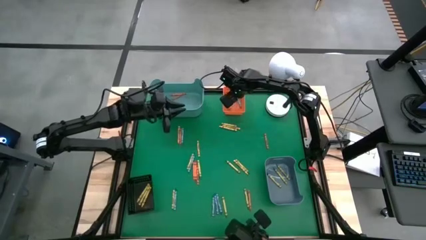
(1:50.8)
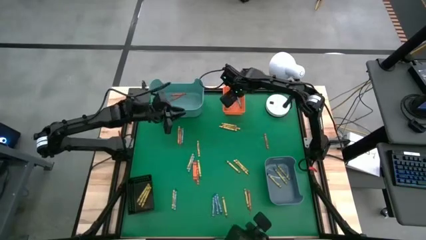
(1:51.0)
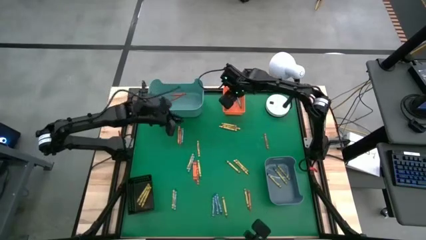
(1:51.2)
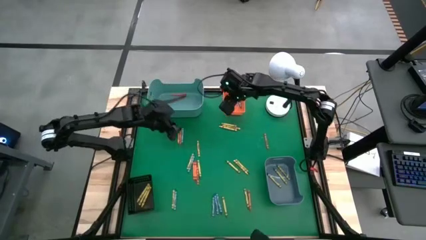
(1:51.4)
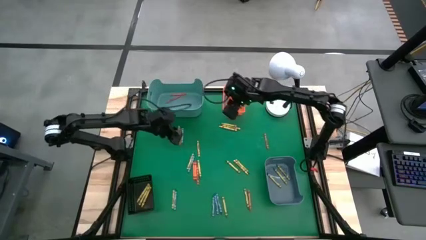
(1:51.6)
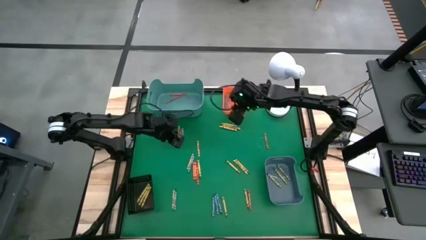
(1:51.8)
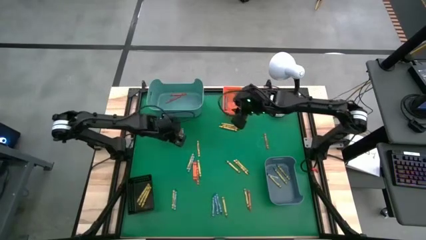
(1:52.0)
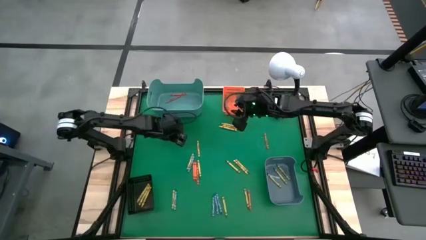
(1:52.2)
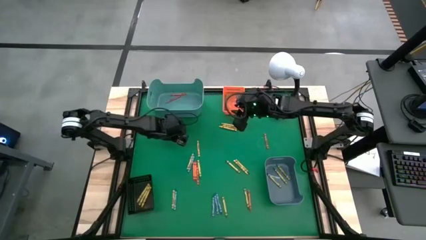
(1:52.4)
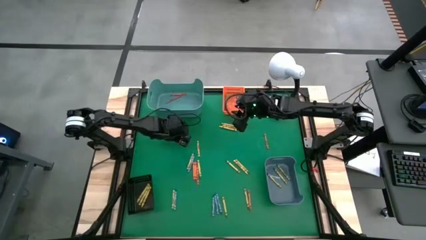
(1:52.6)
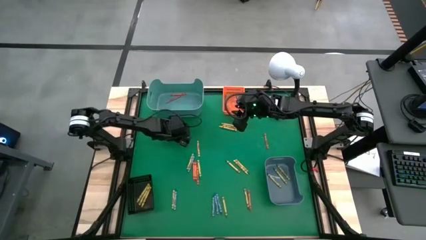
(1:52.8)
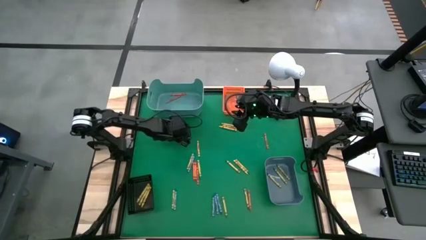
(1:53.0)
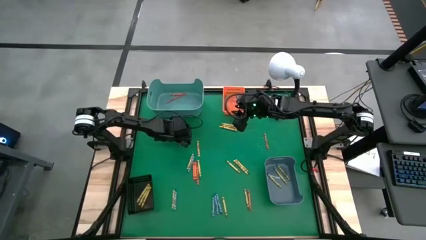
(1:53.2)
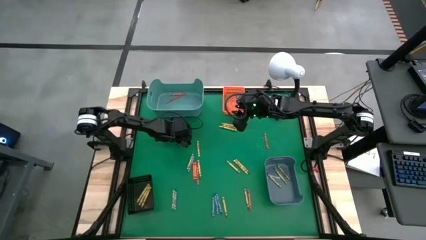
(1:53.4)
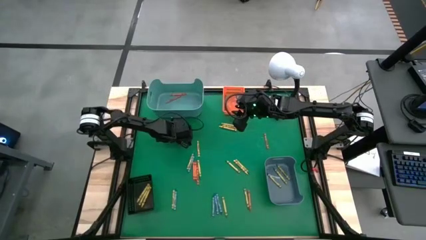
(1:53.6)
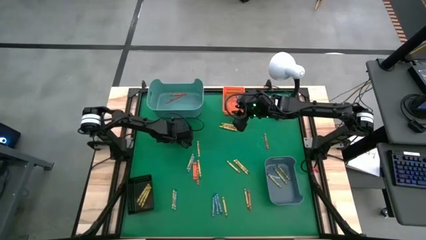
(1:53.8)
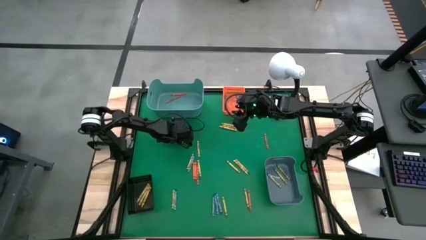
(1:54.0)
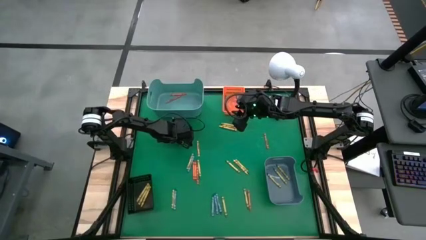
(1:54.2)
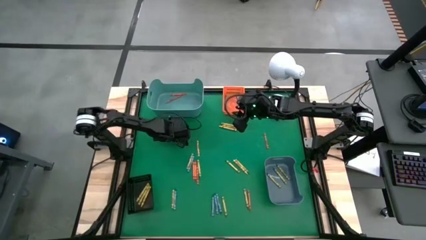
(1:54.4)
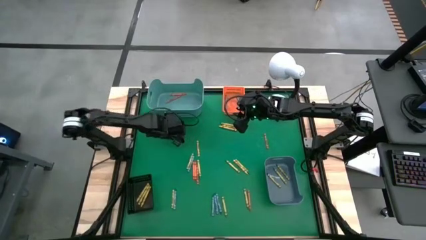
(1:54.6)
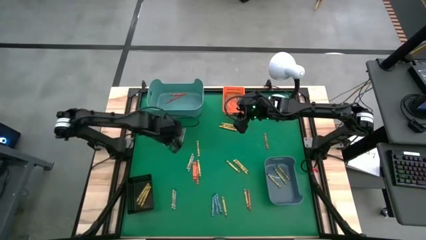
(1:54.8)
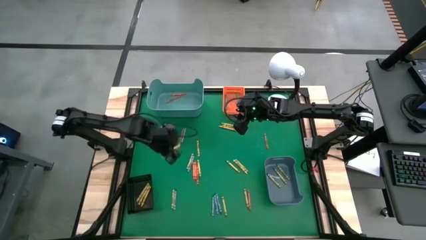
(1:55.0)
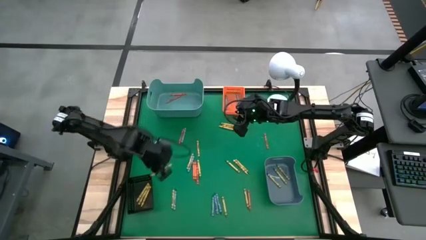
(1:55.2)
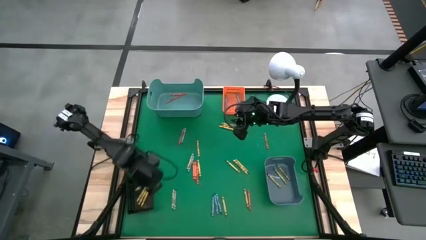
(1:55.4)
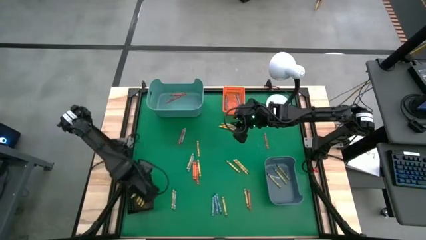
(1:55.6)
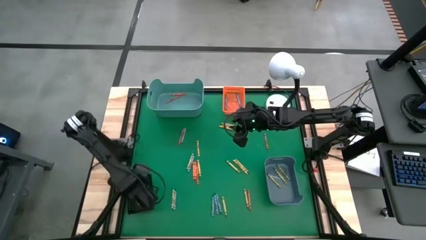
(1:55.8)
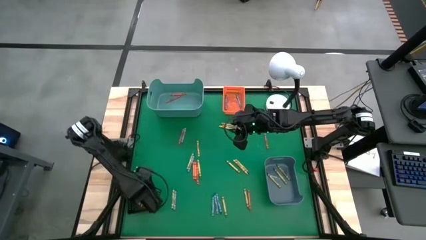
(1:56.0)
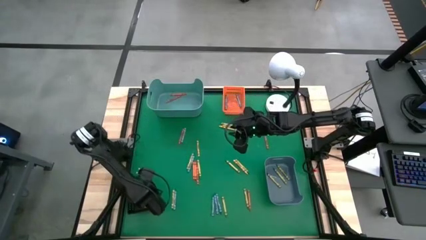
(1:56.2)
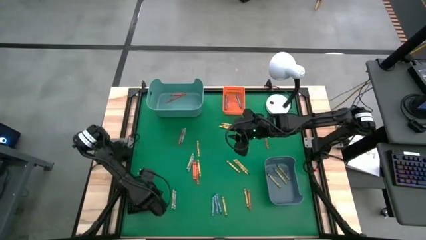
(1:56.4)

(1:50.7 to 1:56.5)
Task: Sort crayons
Put the yellow crayon into the black bin

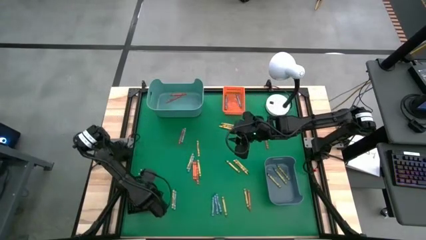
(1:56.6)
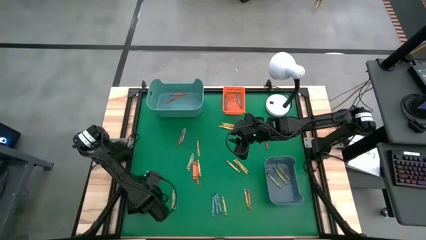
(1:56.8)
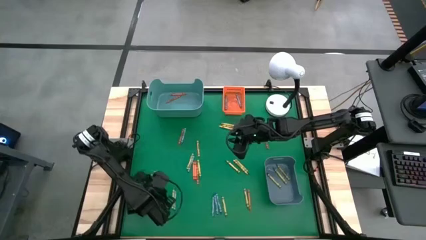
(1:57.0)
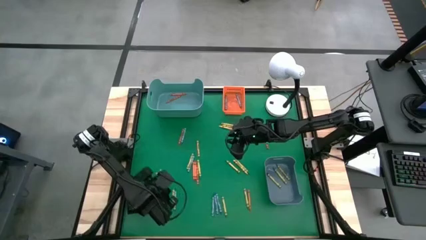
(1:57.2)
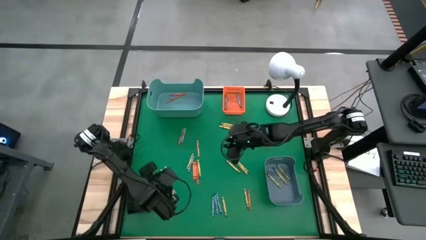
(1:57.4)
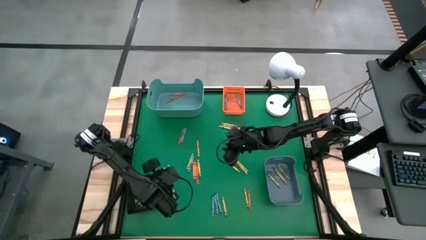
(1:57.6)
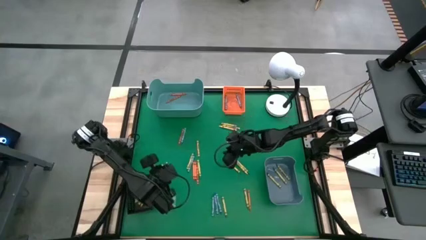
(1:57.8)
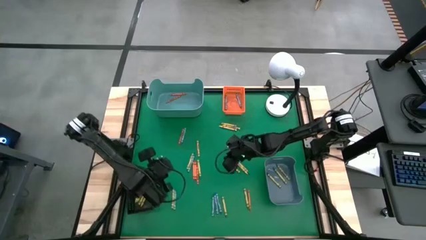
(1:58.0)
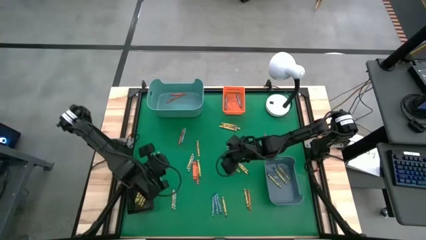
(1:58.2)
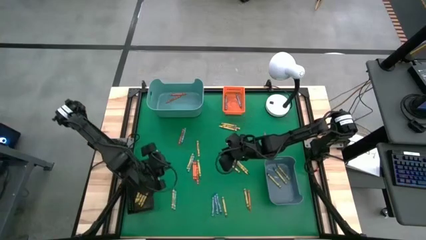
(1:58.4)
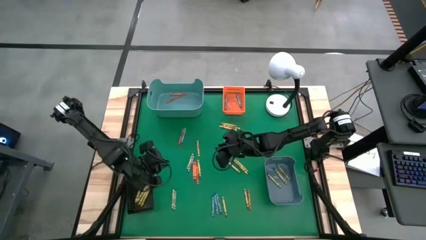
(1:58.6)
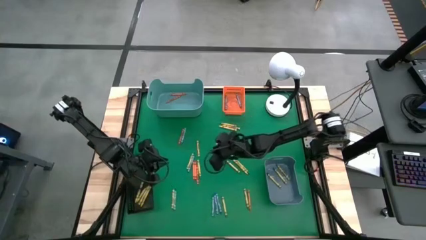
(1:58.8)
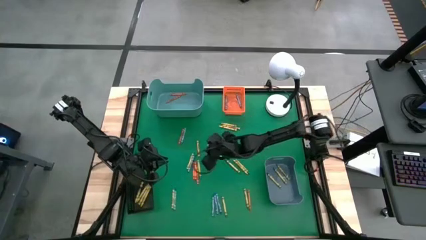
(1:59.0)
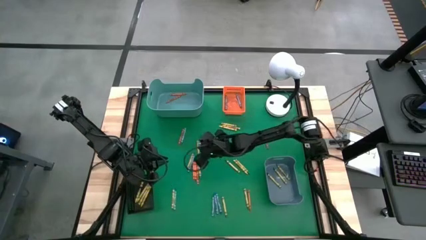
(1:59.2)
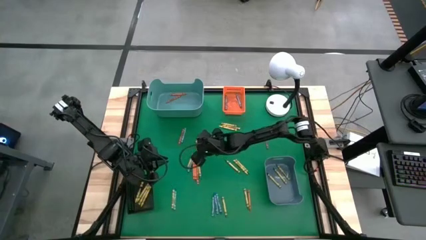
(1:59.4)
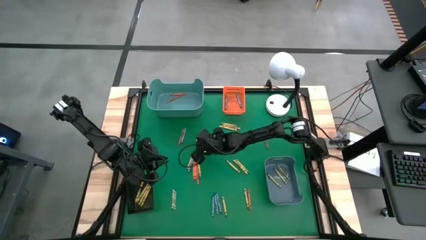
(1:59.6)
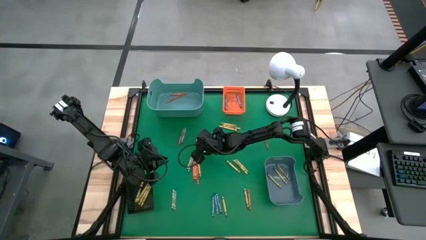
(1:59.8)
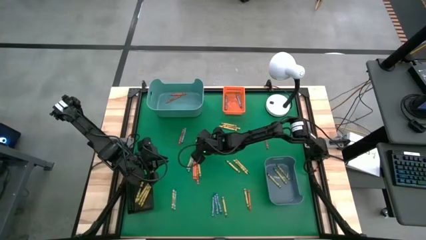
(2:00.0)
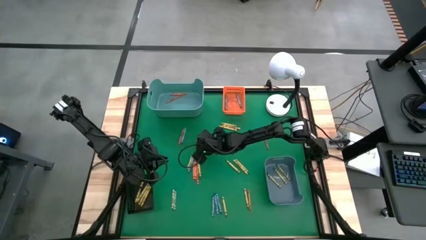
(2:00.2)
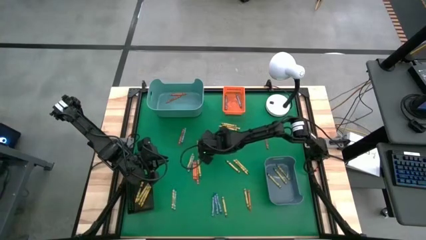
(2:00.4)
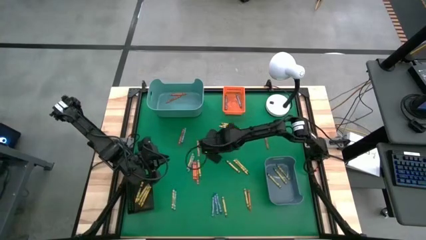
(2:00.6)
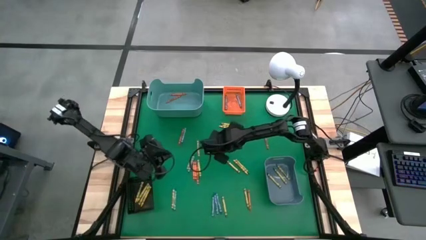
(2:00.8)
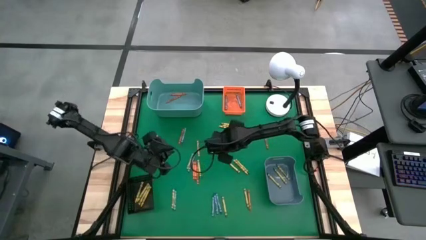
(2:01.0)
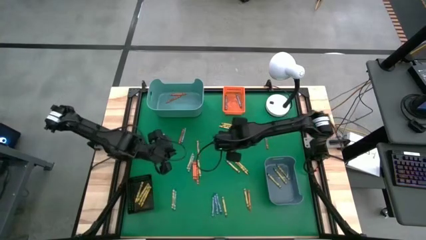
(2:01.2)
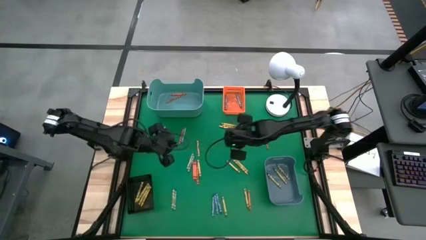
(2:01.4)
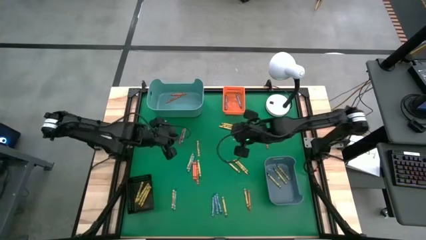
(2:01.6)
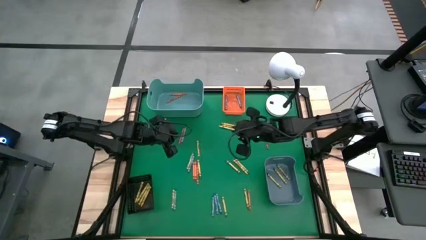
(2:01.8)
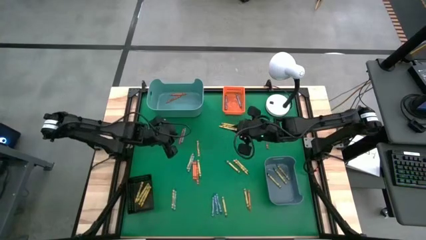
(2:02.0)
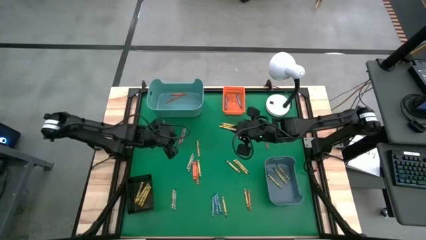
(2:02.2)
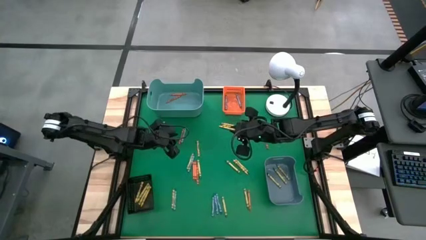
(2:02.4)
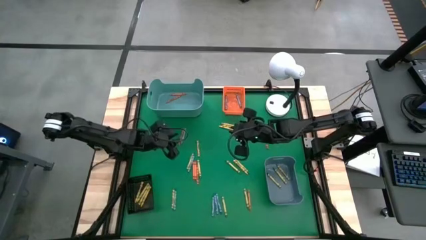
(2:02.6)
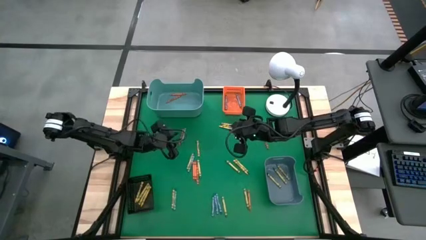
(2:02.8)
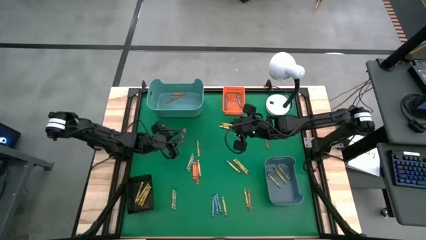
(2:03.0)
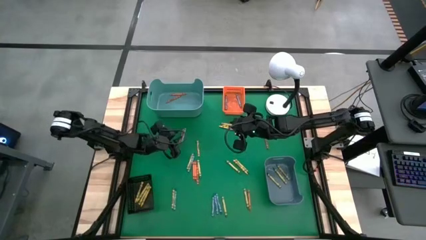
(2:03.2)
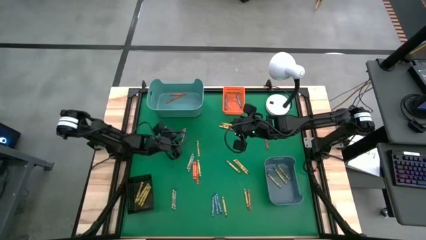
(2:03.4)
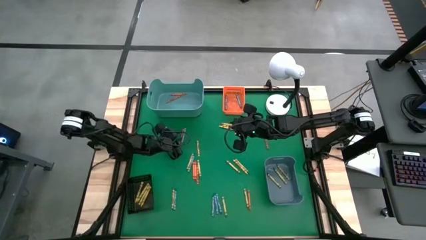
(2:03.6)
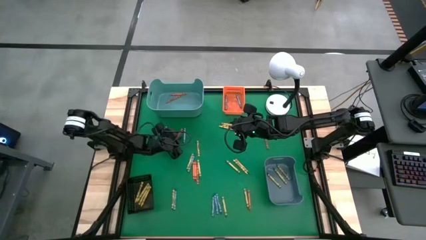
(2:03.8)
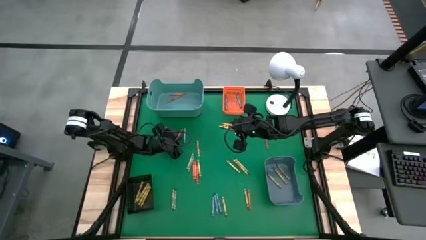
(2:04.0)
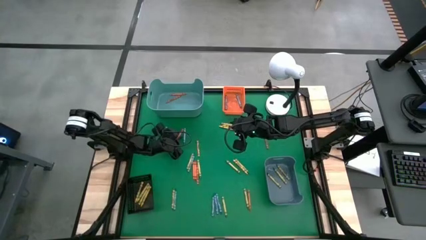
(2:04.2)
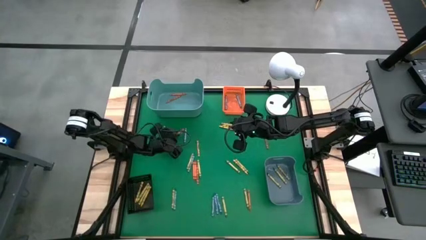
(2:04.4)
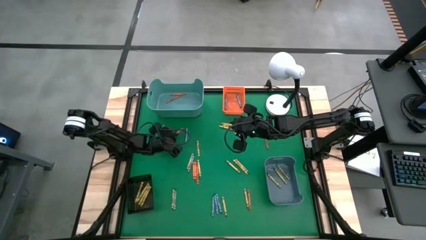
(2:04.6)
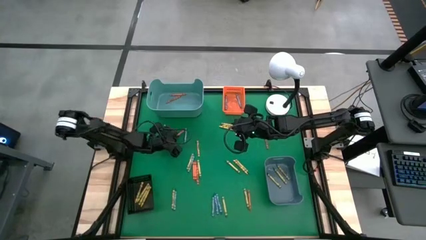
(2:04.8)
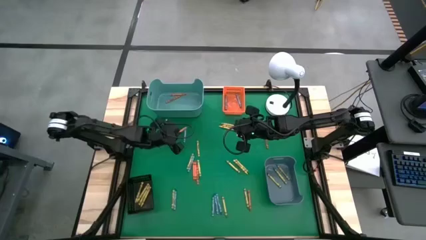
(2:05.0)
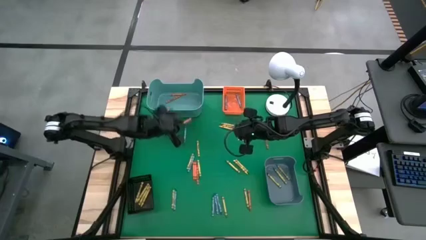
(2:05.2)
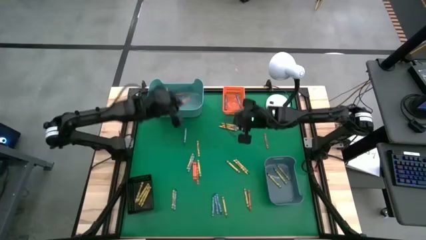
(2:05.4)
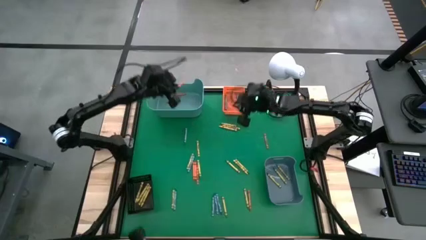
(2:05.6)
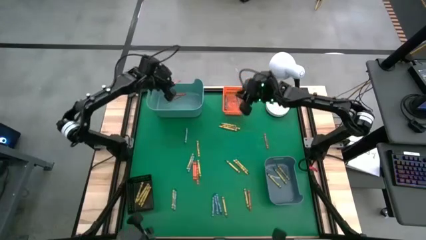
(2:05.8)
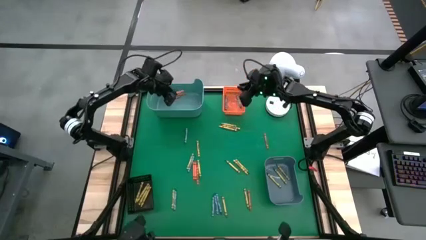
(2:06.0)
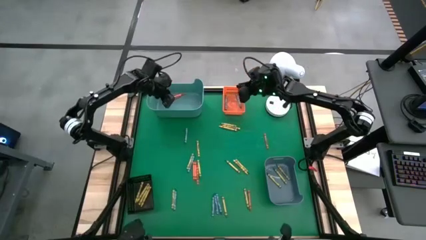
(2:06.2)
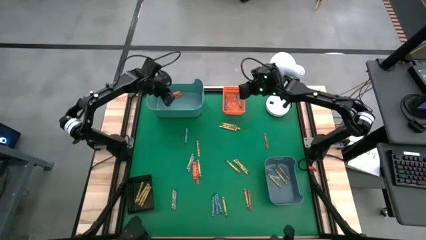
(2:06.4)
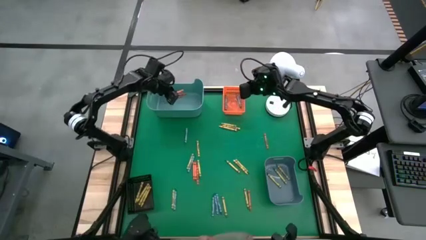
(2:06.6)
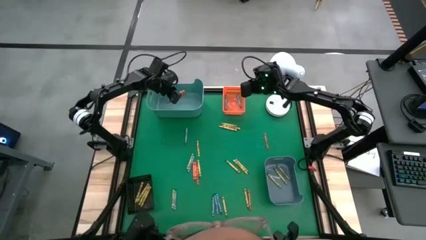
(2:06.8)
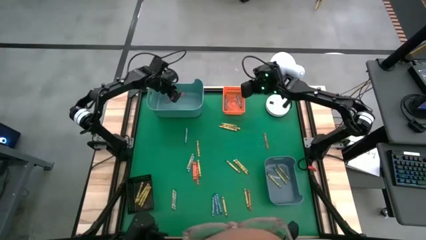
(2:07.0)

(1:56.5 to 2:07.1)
Put the orange crayon into the green bin

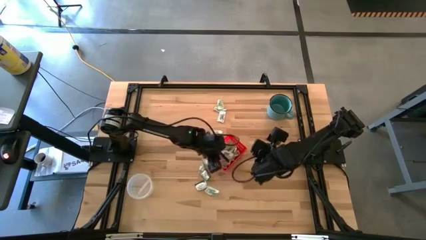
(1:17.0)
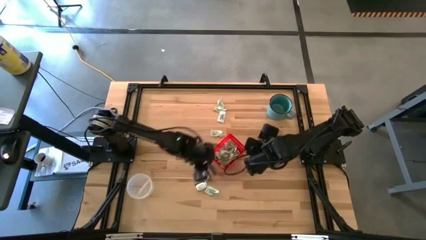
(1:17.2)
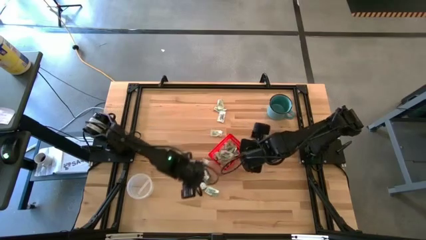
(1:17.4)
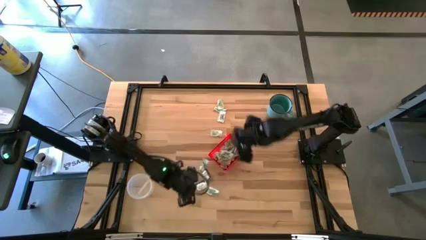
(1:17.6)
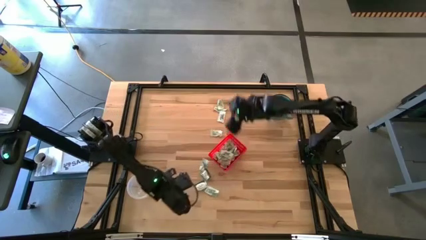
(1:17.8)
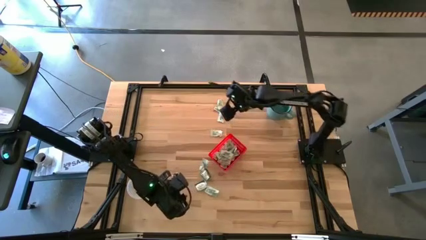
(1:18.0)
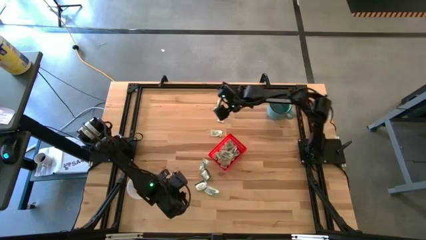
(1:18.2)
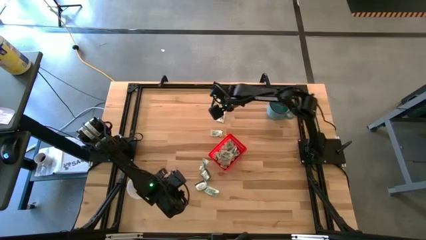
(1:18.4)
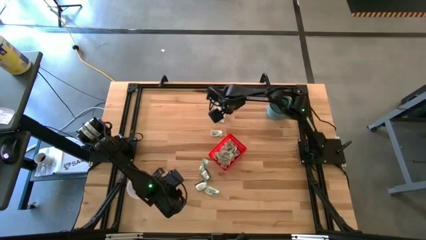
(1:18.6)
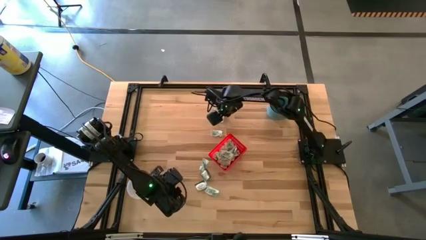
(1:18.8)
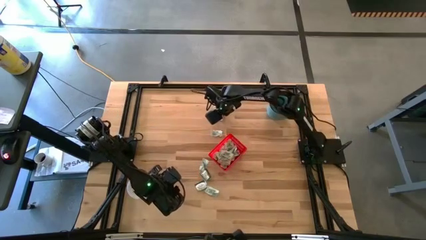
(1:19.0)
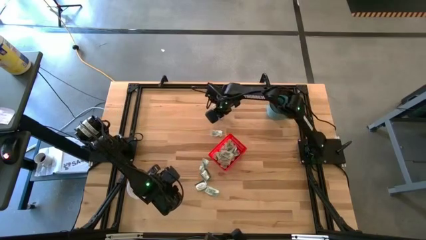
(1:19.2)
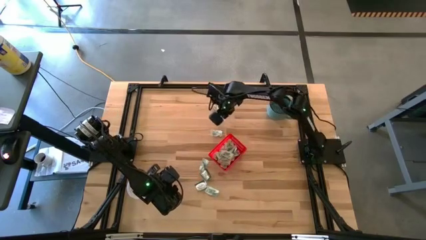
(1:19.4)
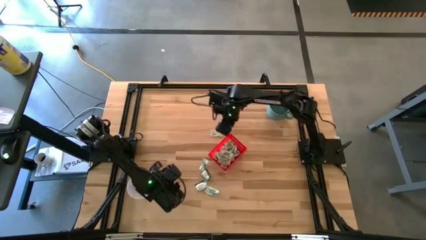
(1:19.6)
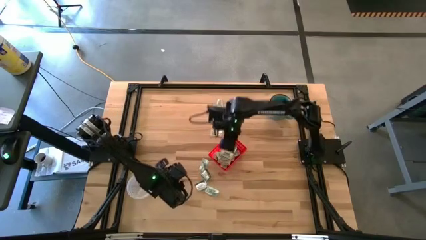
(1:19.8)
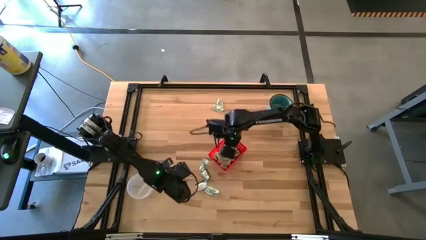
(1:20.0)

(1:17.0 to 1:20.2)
Task: Pick and place items into bin
Put the white stevia pack into the red bin
